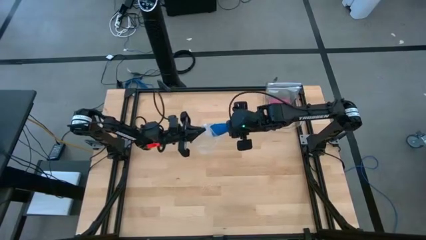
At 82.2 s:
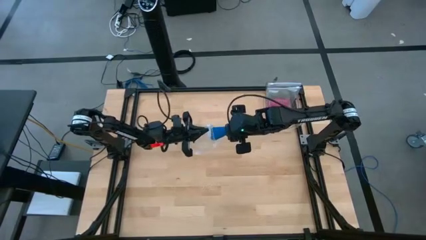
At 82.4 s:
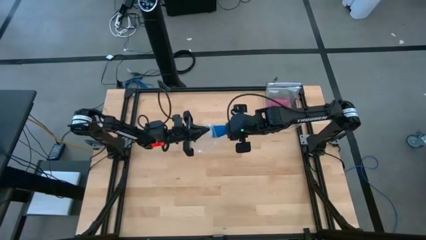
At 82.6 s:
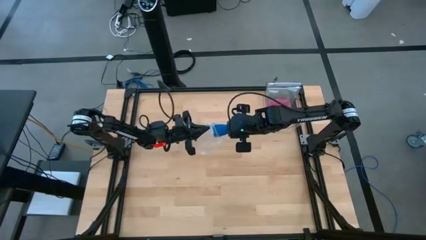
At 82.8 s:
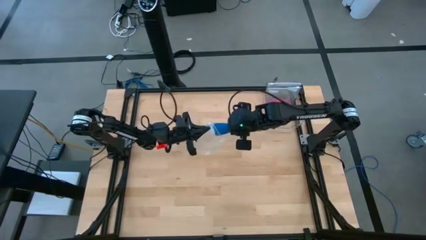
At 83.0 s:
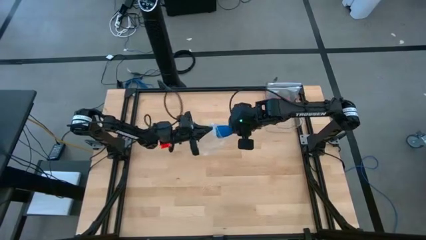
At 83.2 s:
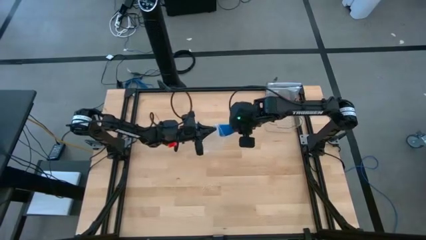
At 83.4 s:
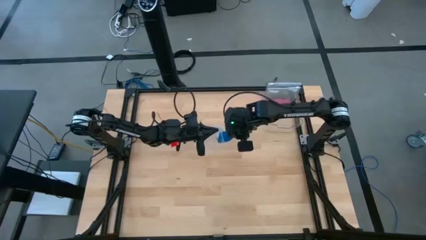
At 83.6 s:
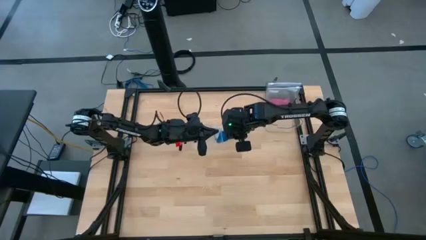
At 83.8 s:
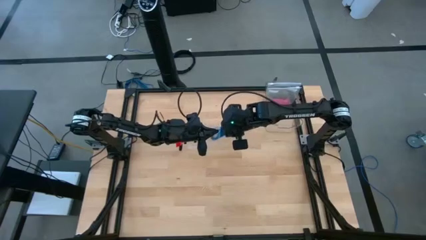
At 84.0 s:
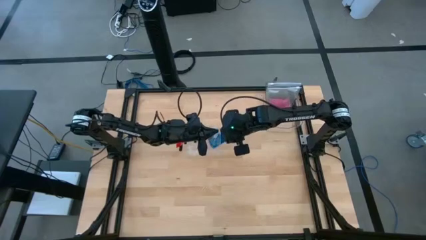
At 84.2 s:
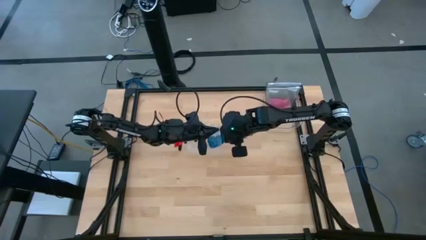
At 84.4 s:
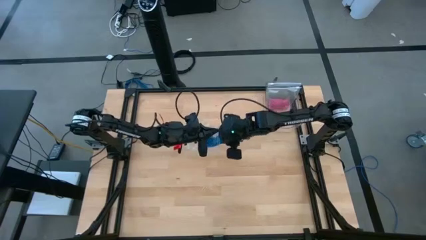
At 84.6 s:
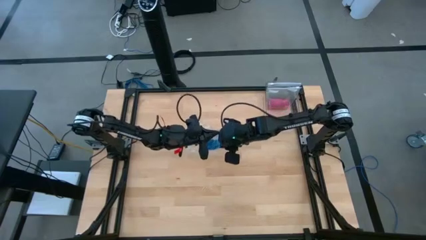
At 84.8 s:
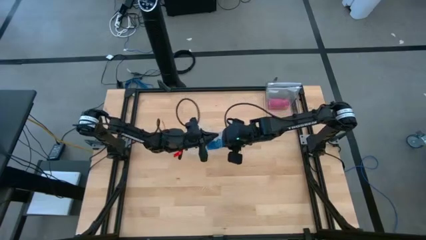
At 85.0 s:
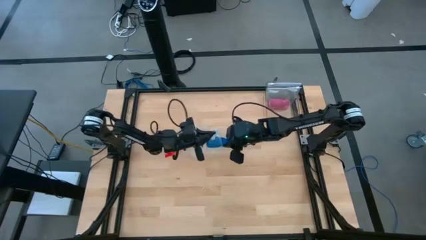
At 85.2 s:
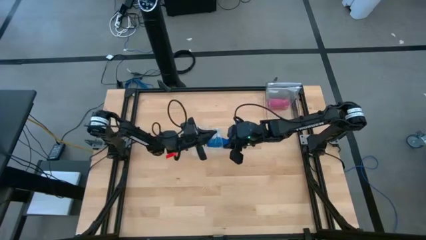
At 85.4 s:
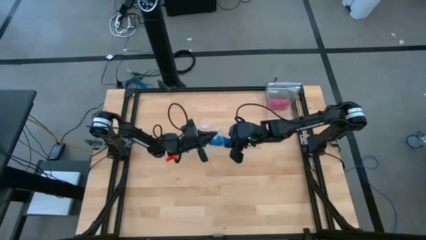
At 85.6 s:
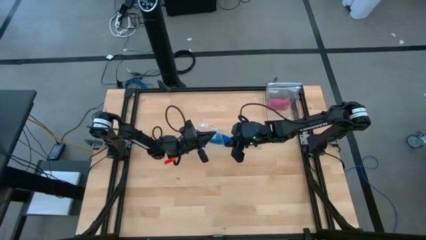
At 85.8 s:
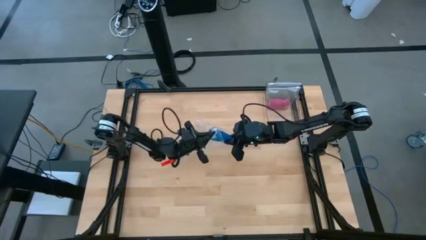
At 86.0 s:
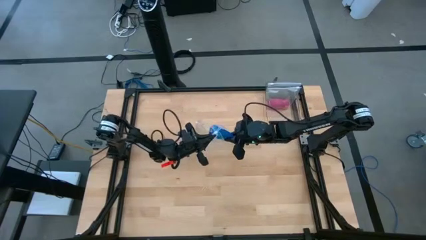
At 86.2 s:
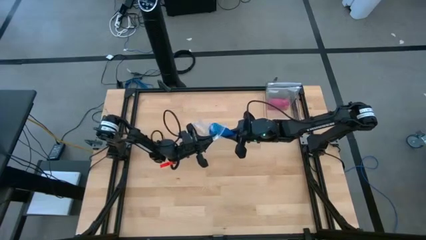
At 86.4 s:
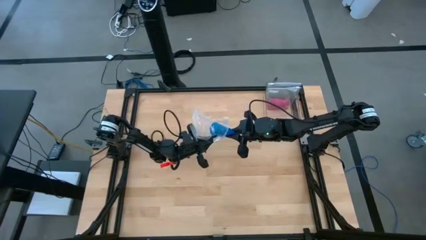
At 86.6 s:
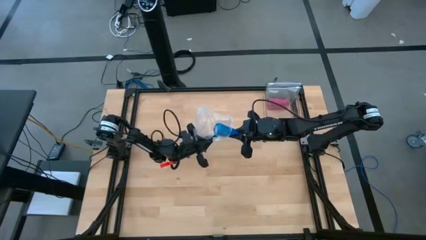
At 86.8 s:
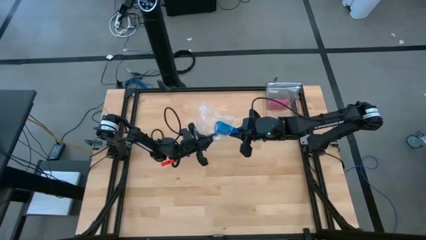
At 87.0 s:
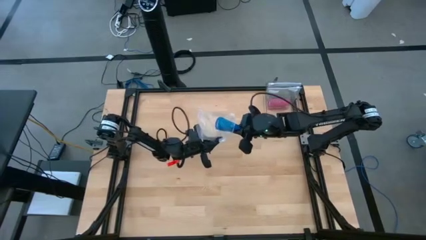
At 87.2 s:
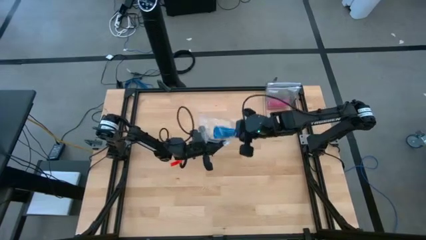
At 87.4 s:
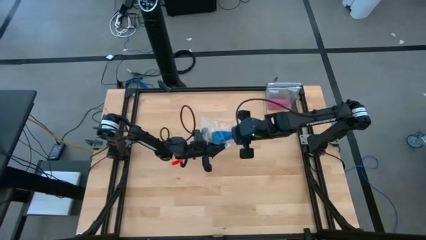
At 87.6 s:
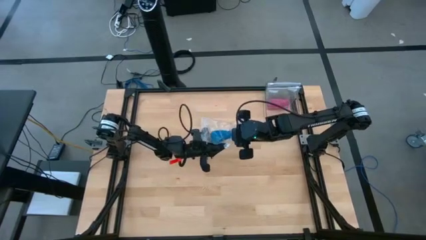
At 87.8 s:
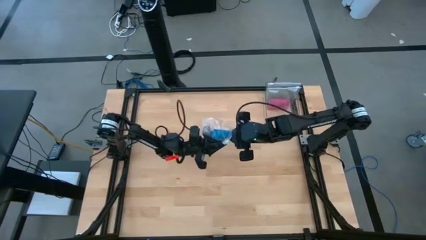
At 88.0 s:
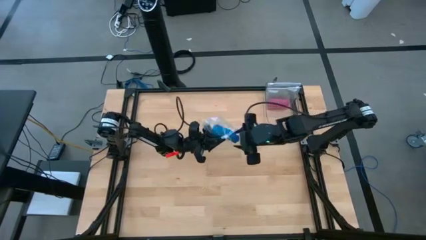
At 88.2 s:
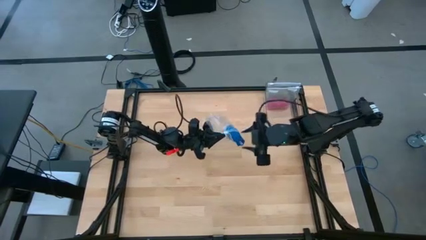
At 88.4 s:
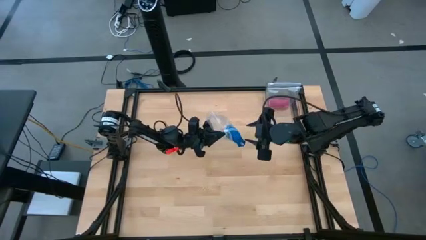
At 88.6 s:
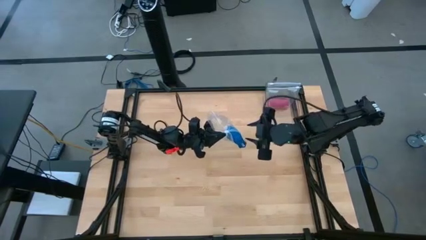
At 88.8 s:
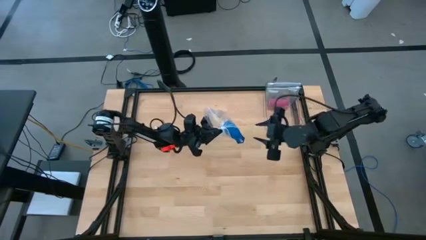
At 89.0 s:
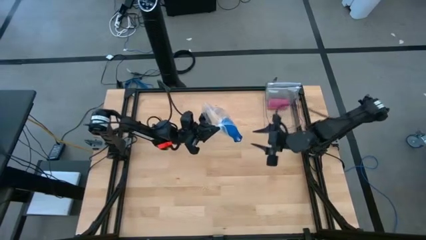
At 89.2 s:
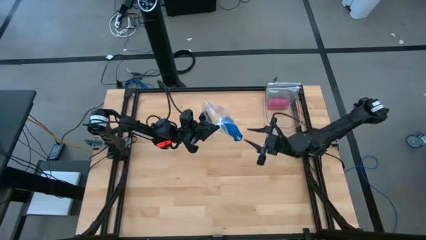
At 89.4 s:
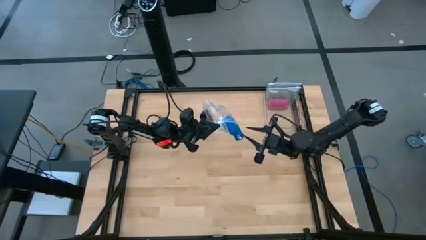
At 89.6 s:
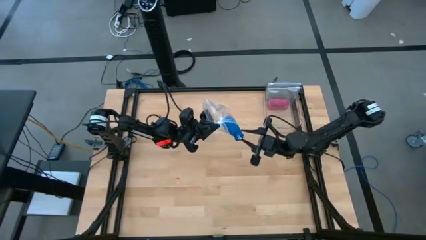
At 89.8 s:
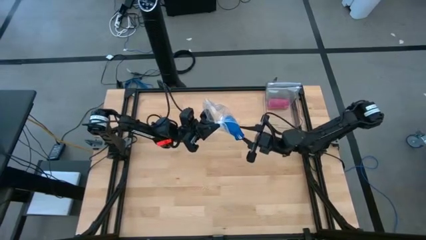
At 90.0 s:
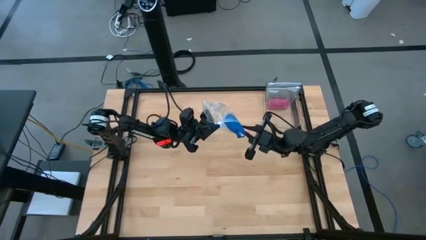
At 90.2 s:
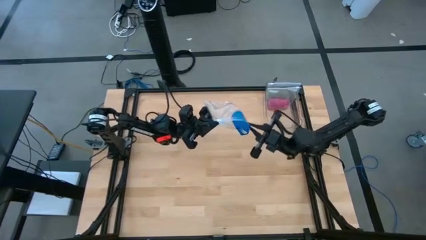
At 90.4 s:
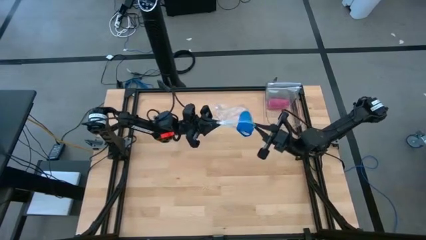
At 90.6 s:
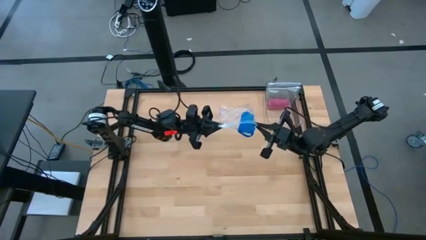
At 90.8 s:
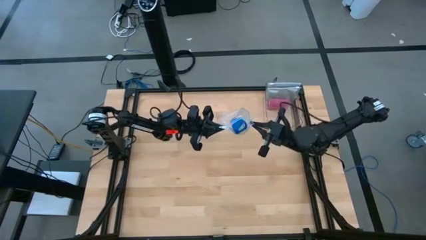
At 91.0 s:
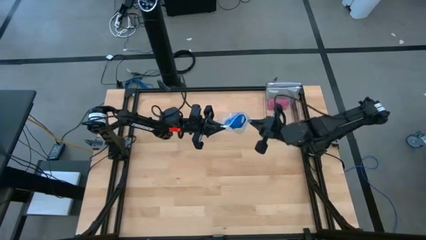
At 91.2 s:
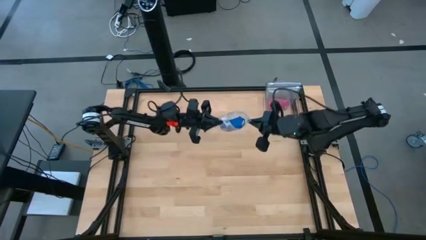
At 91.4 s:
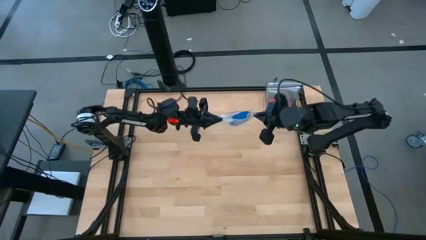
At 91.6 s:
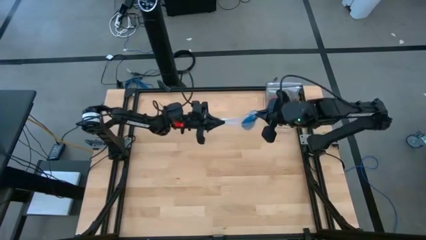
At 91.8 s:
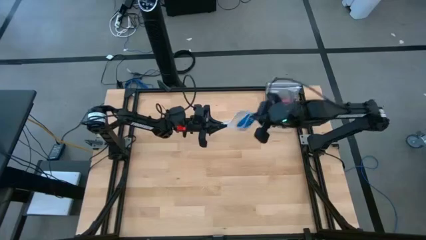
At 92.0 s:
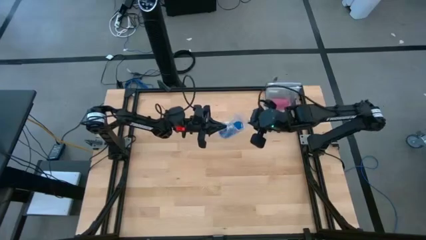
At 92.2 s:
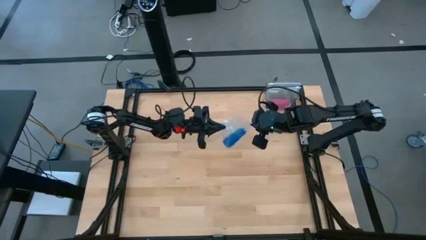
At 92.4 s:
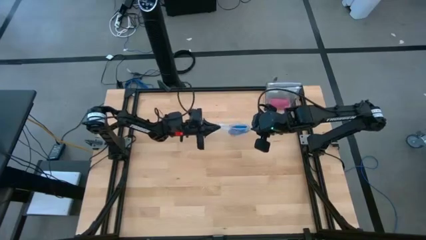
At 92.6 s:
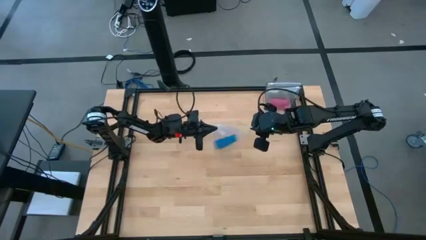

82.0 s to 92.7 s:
Task: Roll bandage
Put the blue bandage into the transparent zip bag

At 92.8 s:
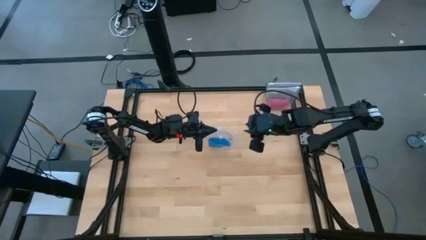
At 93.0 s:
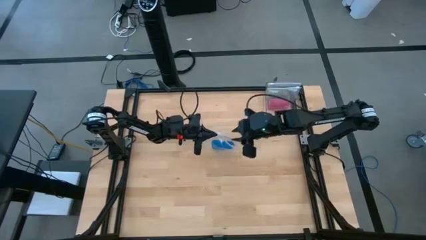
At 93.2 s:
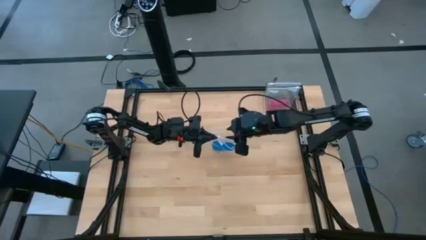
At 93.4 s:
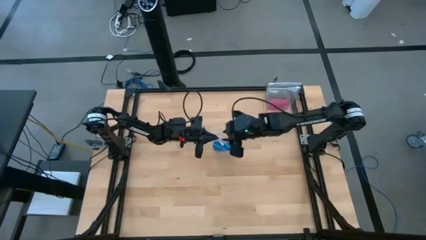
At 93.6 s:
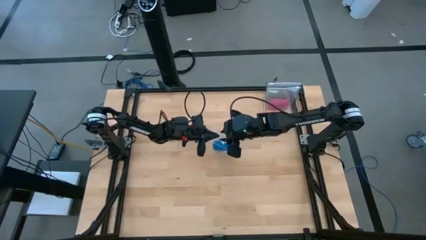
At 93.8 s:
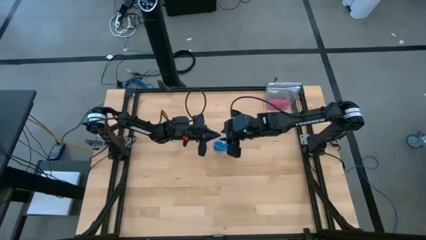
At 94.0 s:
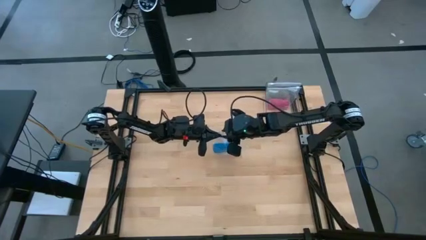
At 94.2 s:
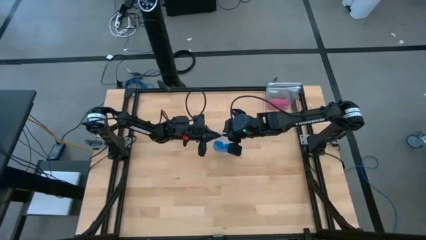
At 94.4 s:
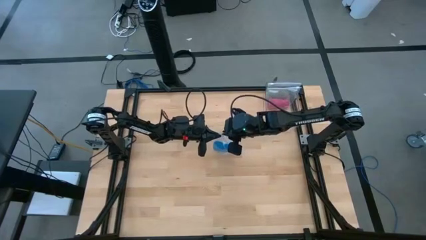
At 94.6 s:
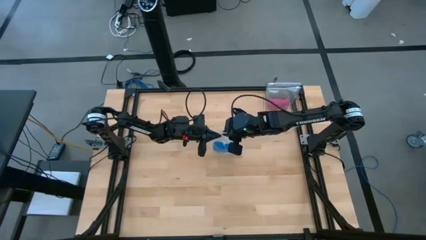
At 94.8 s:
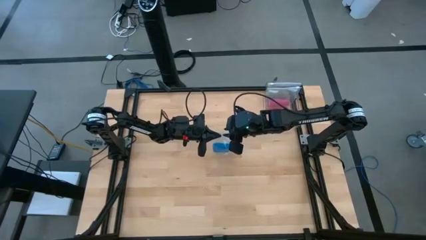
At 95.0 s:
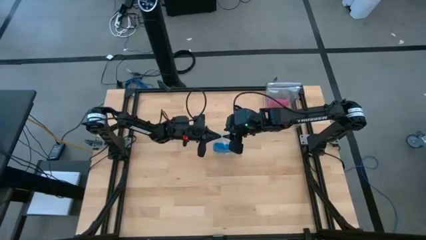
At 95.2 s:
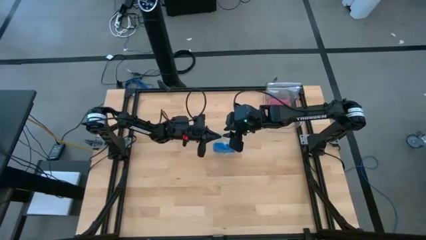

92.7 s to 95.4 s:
Close the transparent zip bag

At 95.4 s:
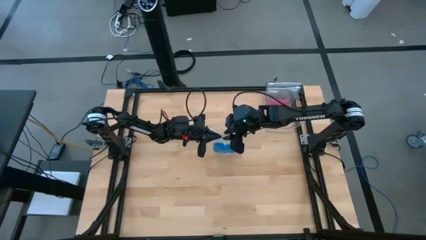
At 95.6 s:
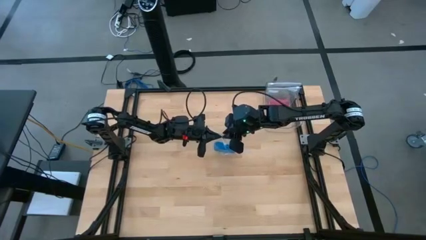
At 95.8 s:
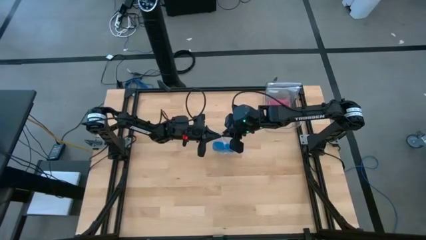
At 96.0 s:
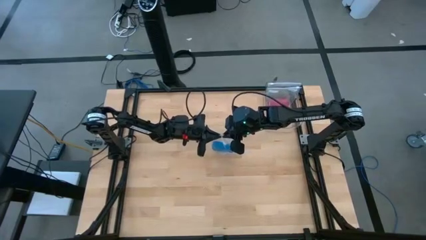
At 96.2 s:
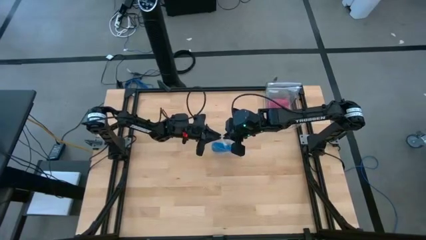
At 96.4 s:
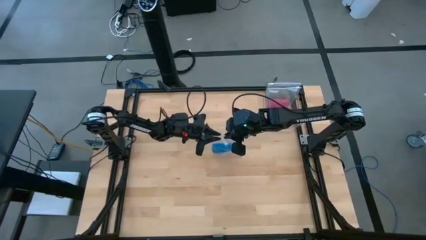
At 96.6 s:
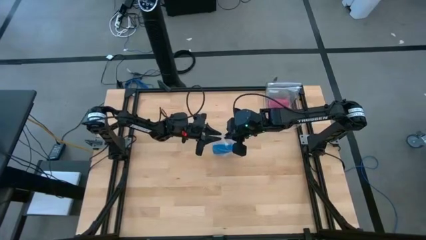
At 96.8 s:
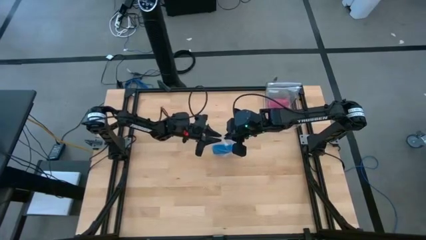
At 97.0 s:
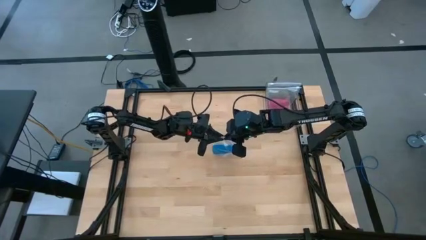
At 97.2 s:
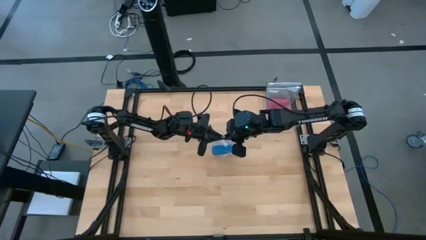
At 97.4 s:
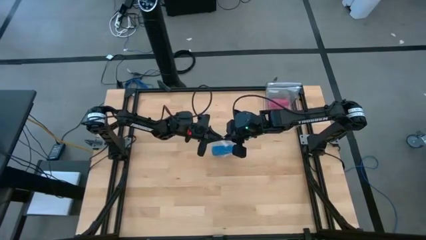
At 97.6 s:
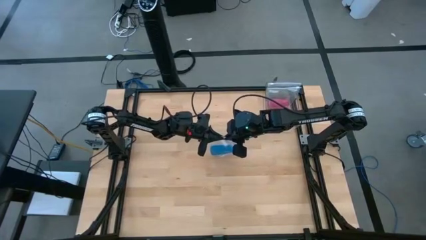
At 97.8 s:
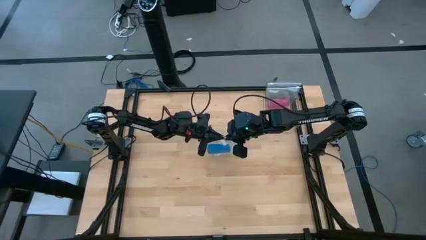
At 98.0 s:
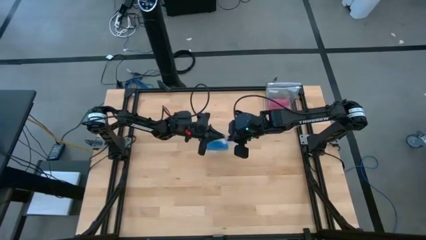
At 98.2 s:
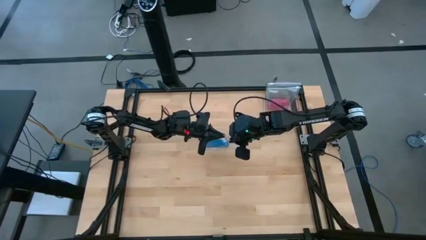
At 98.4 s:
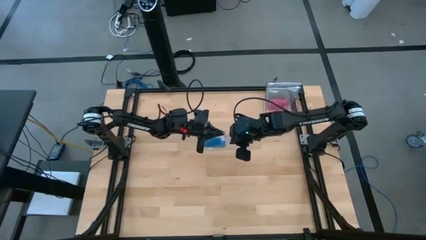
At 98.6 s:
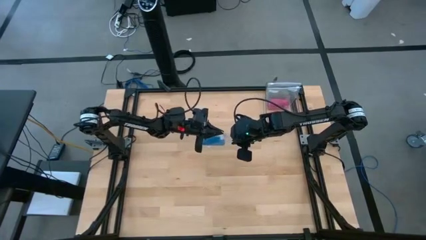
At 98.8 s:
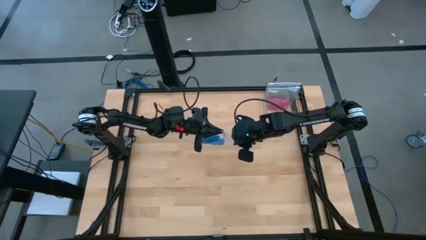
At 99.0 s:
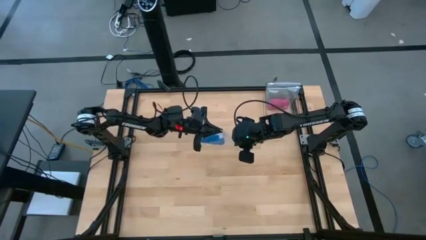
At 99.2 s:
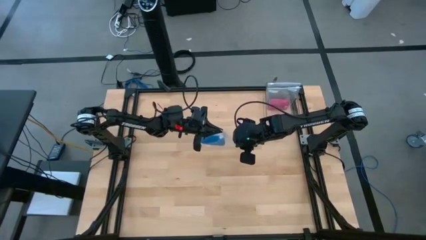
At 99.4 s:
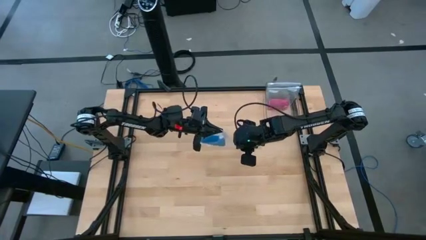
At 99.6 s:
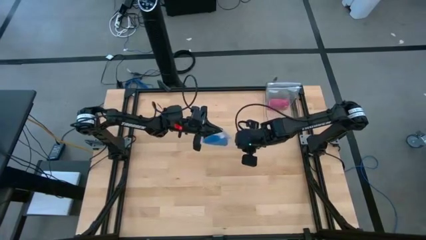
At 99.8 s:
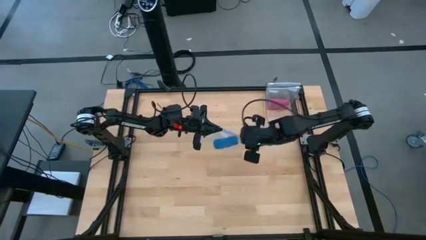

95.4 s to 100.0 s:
Close the transparent zip bag
